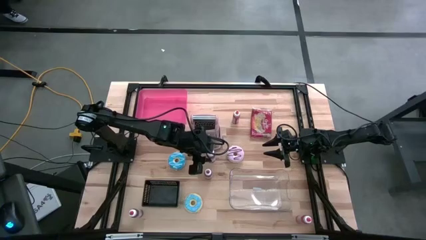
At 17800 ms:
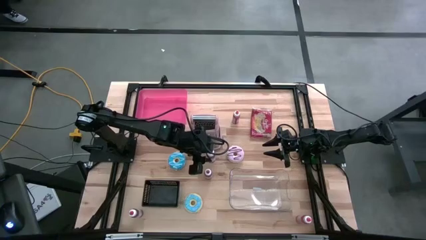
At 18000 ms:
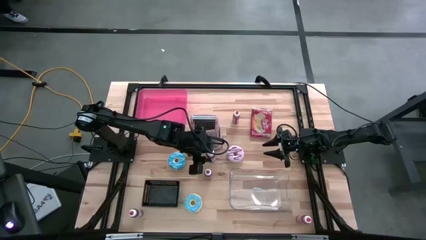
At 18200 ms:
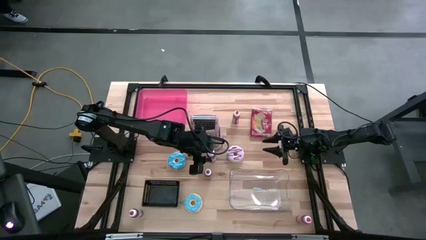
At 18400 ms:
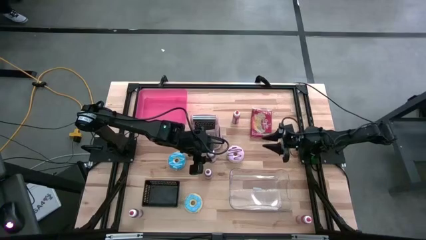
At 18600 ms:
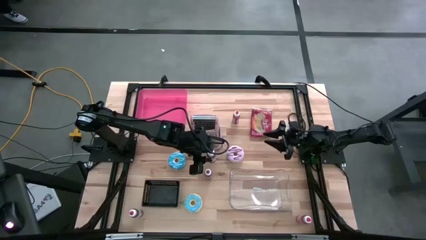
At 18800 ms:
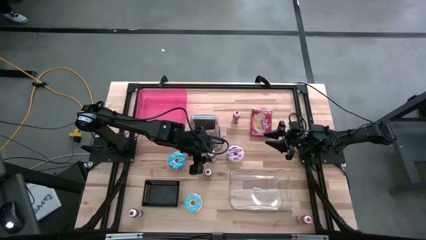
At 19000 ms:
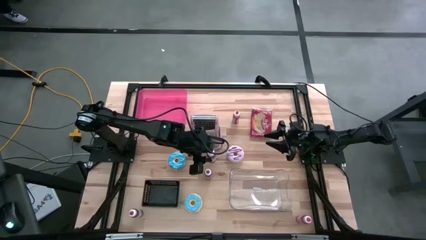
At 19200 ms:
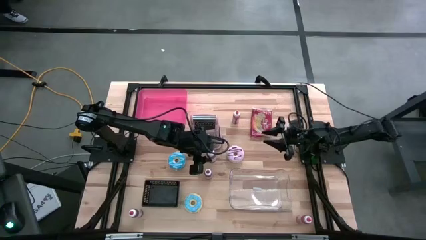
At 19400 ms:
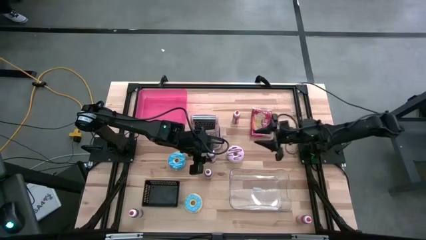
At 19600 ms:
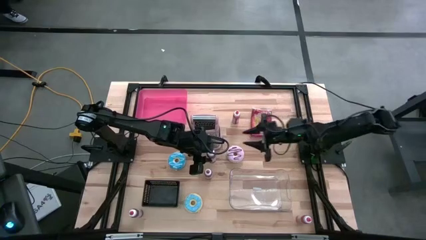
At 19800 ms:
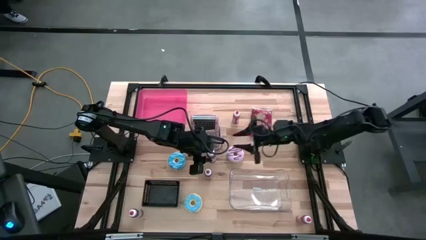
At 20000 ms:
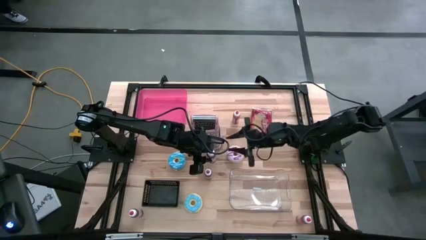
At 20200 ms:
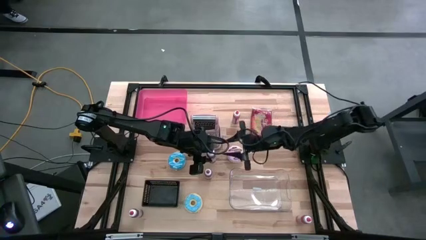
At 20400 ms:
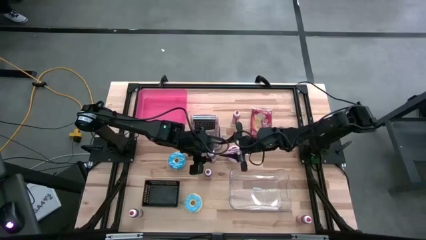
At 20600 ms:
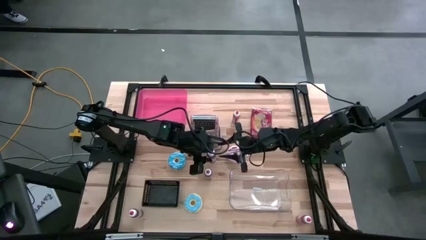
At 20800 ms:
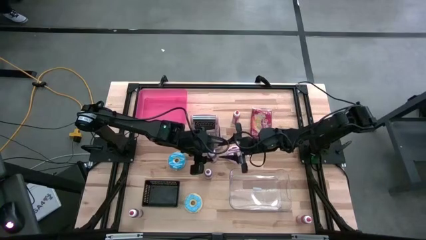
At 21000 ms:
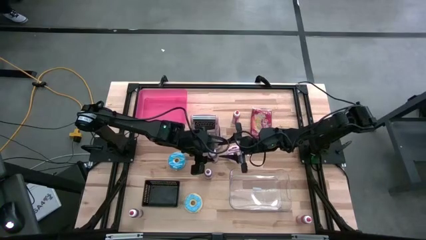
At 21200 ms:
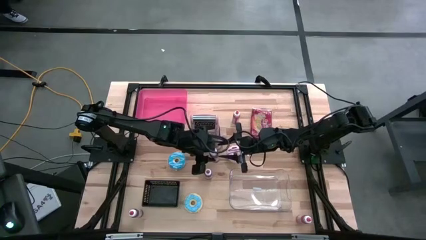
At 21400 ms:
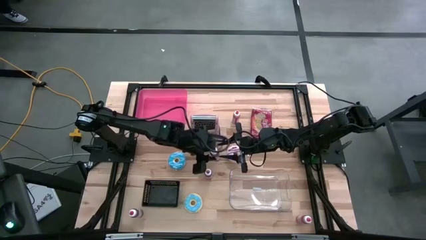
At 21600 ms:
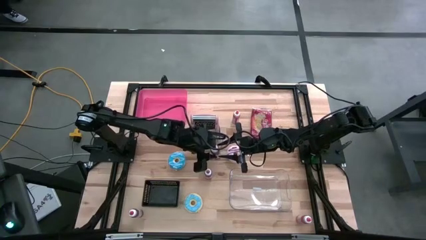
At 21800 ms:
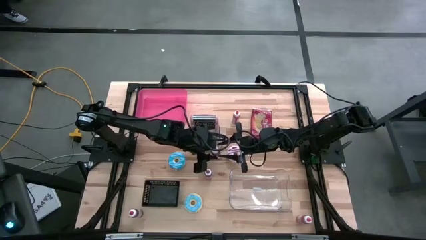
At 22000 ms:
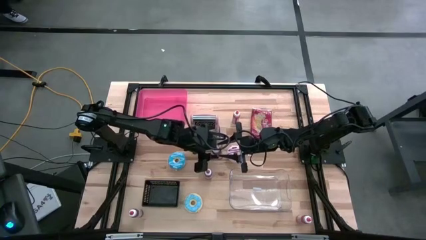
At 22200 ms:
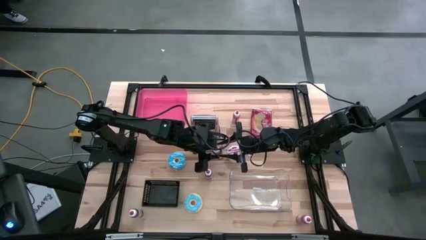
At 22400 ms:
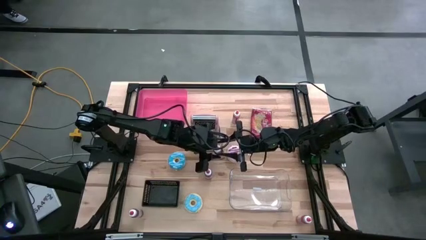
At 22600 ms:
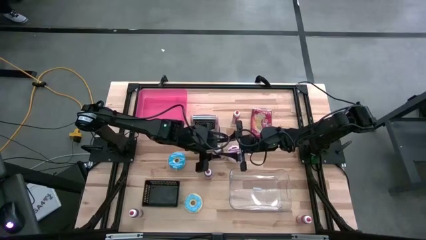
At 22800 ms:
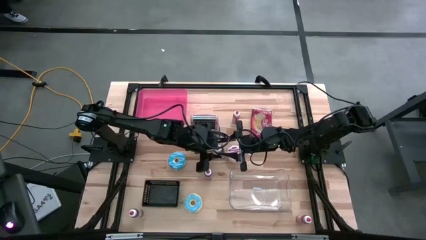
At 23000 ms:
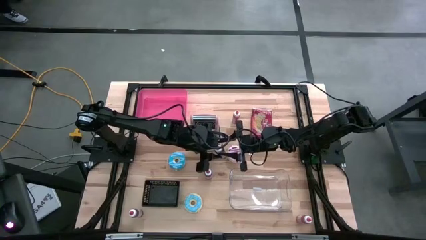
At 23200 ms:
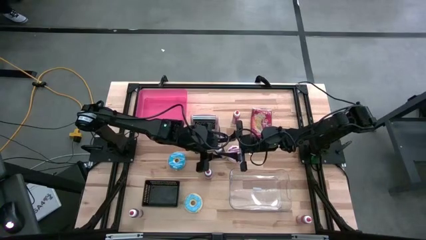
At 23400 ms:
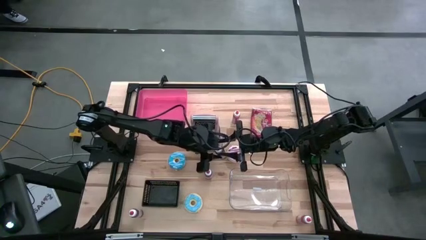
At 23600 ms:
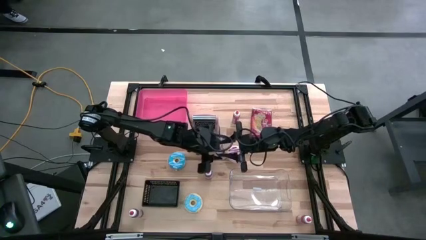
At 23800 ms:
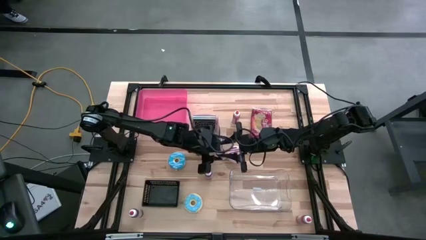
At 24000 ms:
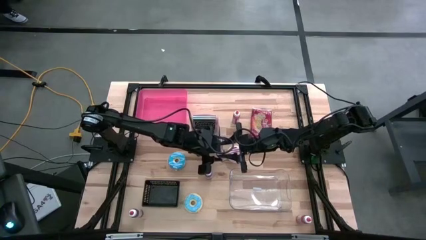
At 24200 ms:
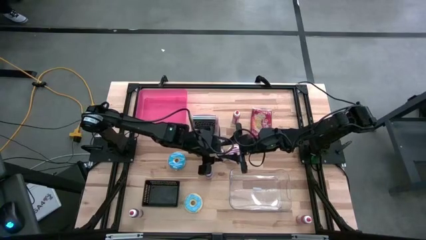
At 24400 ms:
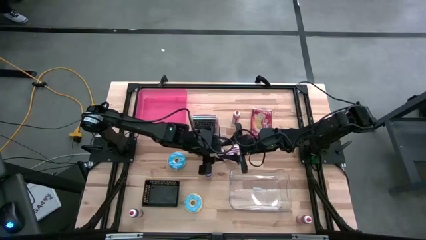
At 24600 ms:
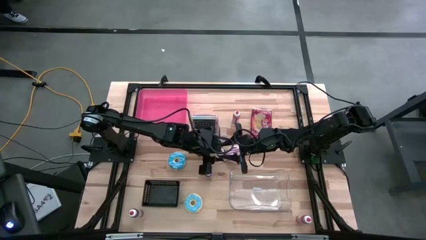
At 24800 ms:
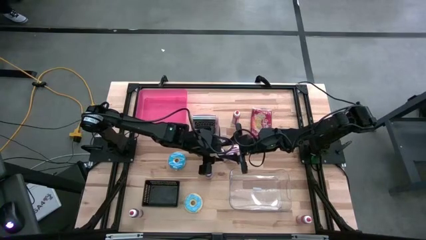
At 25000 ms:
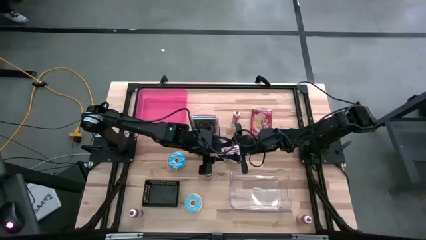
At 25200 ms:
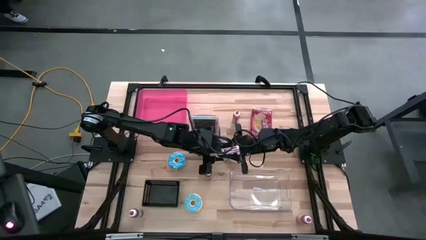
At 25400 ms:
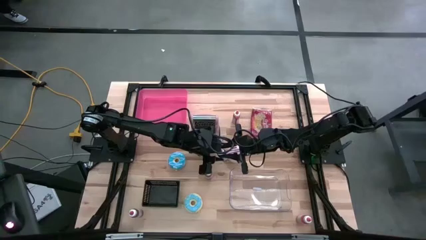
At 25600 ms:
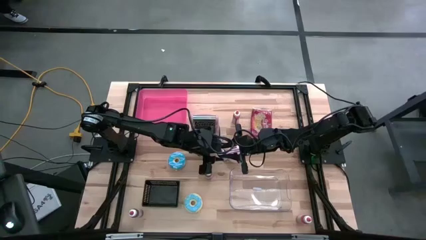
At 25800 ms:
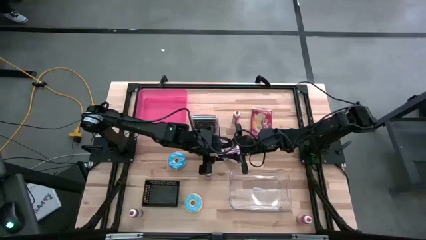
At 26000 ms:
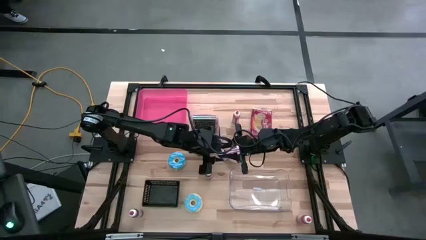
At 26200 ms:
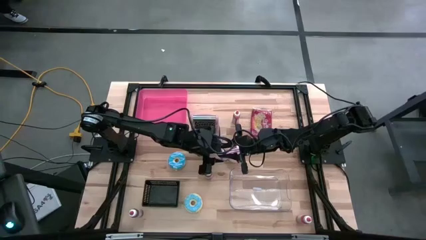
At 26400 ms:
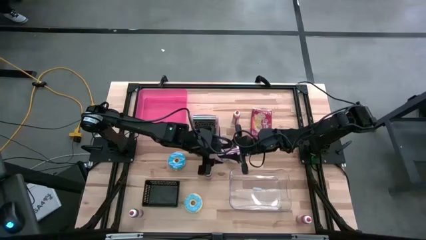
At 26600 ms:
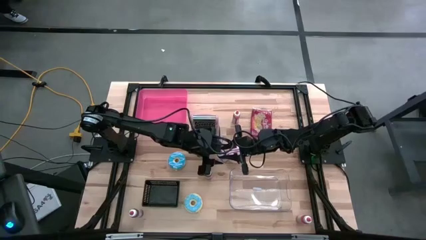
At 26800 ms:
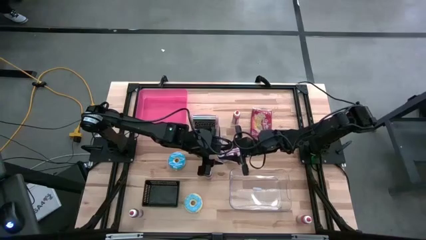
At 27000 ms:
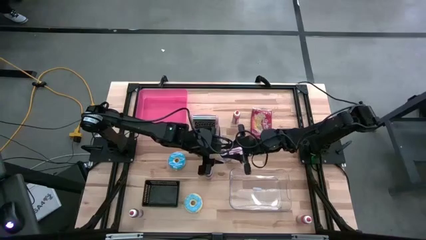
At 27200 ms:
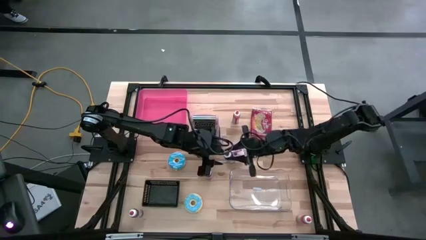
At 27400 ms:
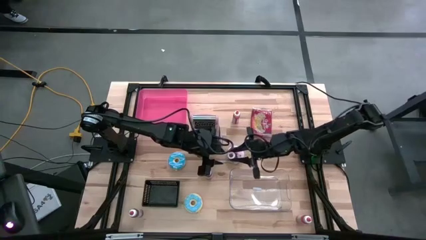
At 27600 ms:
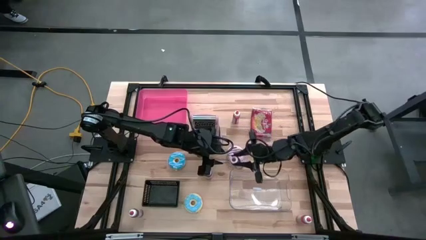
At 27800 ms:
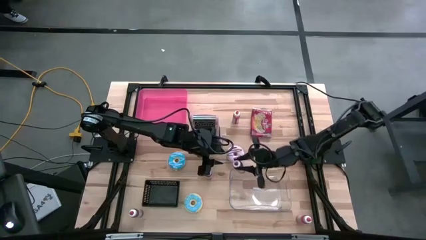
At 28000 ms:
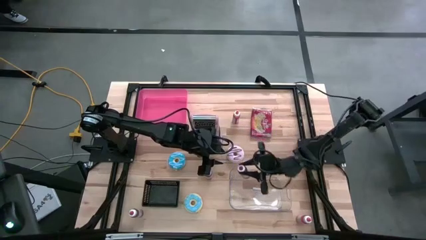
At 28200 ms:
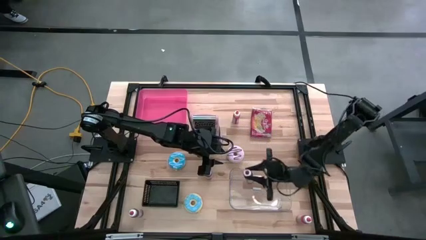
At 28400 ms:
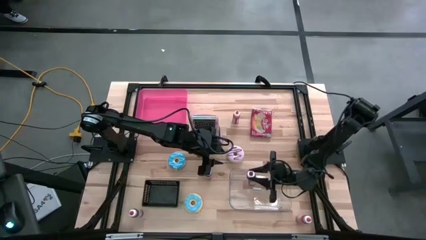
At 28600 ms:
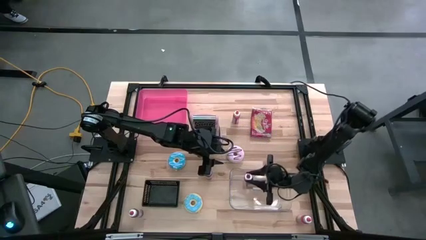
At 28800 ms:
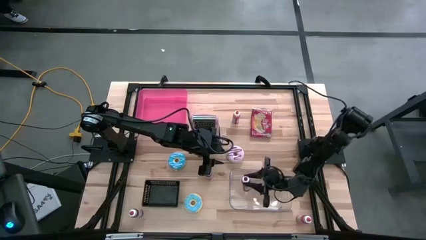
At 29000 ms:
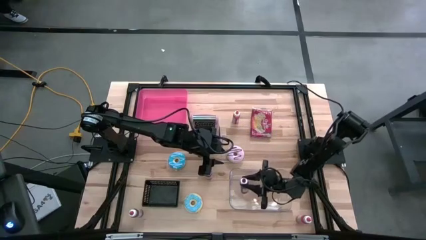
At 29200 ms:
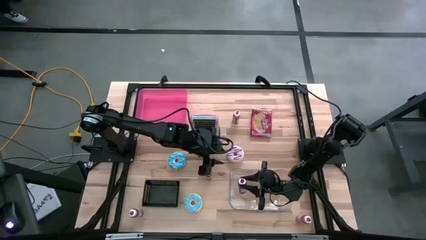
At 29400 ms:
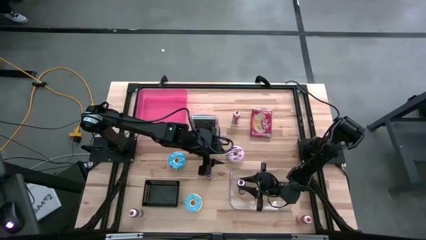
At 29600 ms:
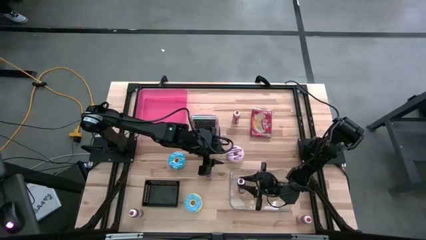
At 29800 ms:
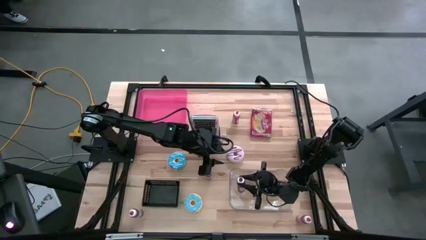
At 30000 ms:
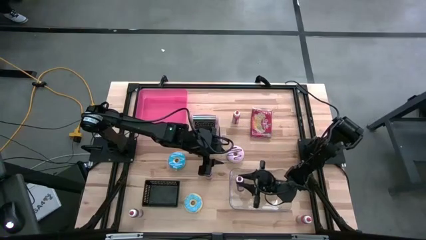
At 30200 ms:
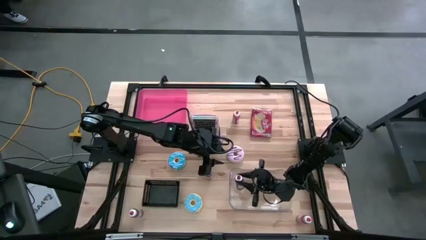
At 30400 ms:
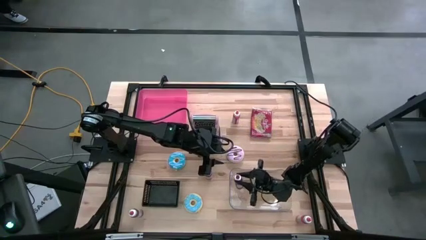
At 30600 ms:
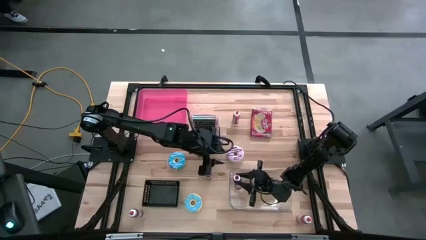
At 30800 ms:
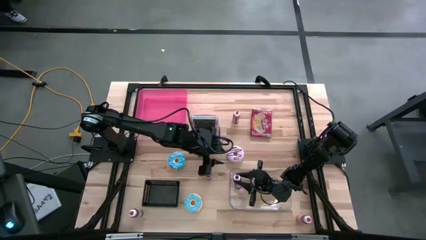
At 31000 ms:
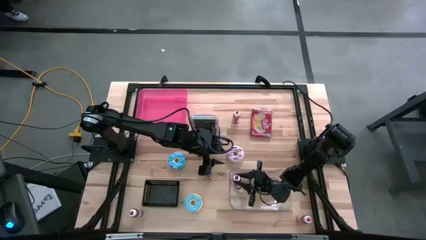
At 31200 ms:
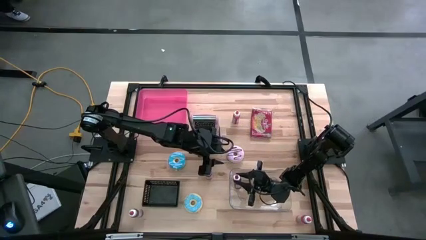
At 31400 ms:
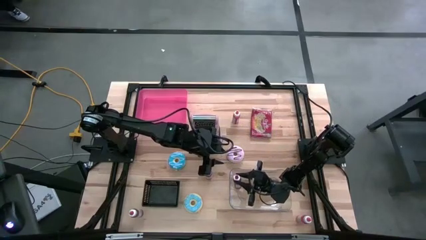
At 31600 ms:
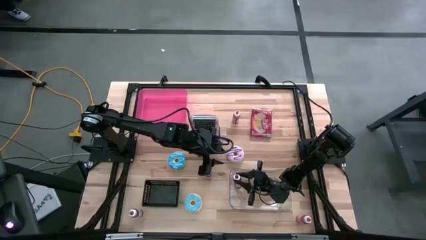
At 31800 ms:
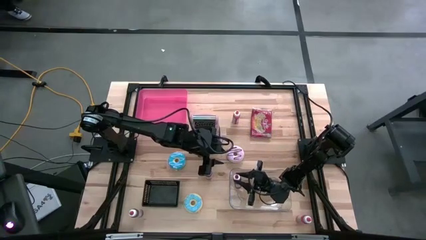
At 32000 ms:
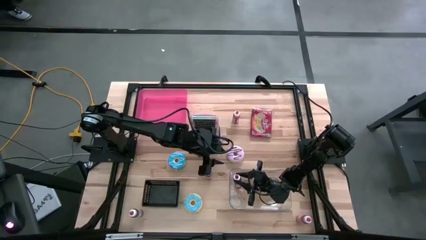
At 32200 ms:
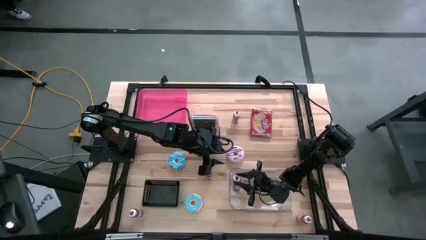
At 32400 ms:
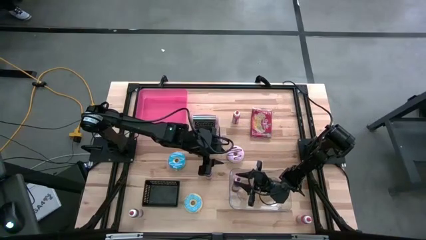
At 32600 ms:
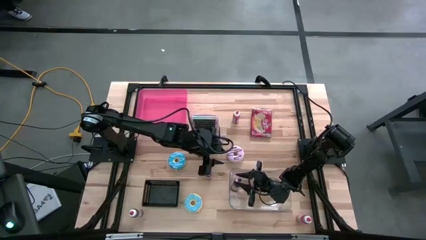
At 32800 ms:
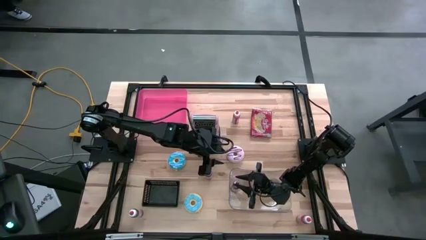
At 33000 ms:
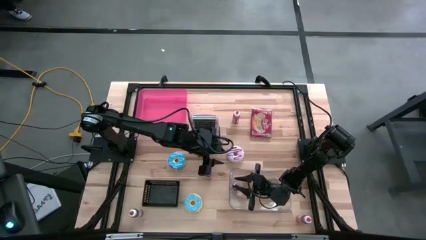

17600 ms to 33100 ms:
Task: Pick & Place Food Item
Put the top red food coloring bottle into the transparent bin
